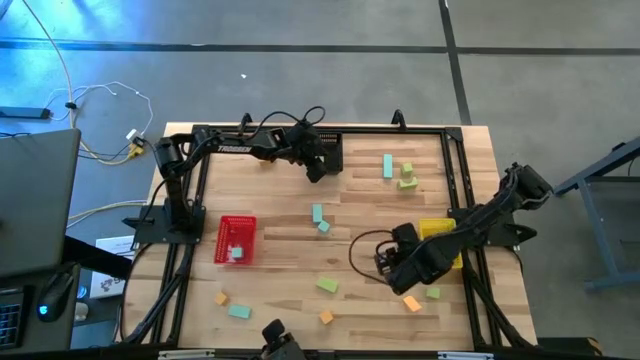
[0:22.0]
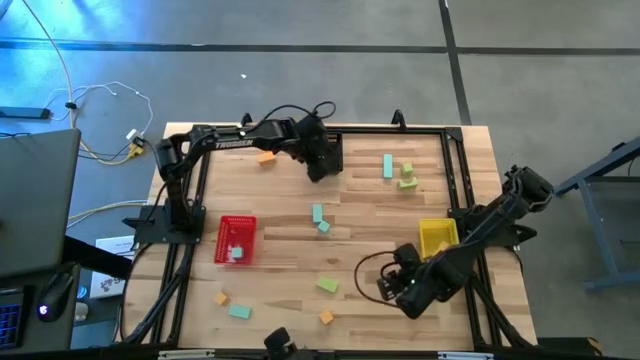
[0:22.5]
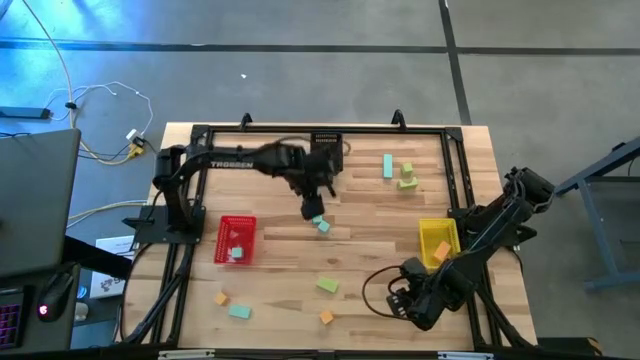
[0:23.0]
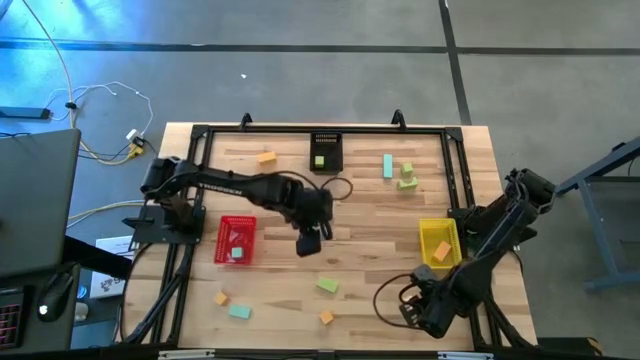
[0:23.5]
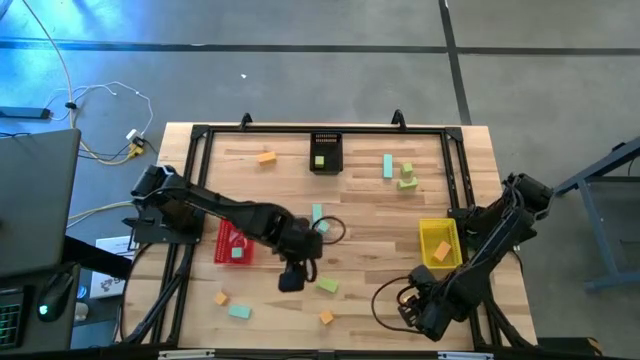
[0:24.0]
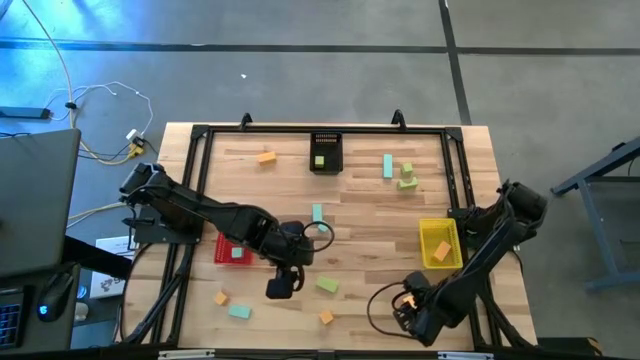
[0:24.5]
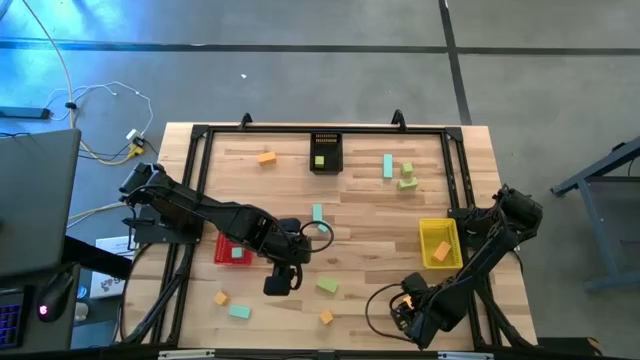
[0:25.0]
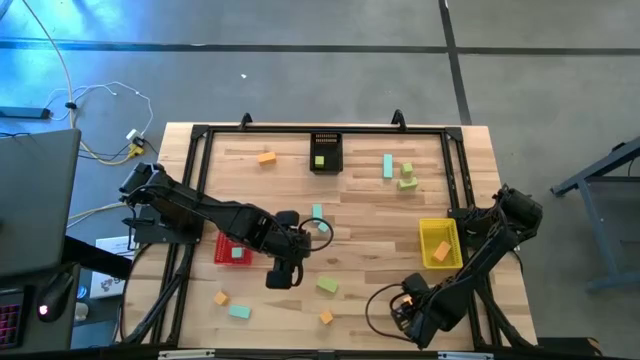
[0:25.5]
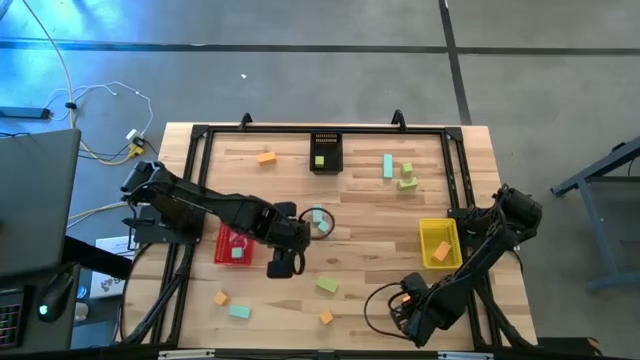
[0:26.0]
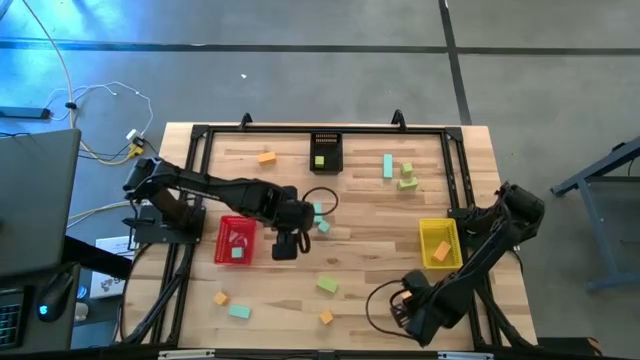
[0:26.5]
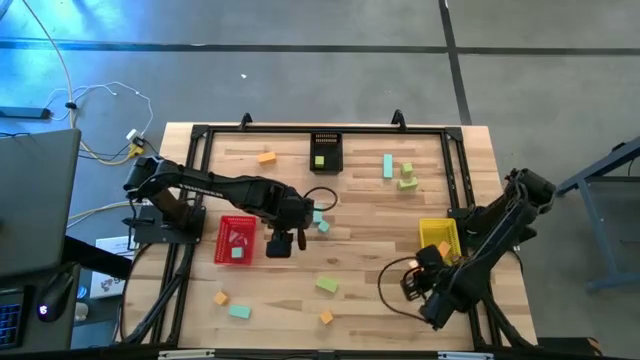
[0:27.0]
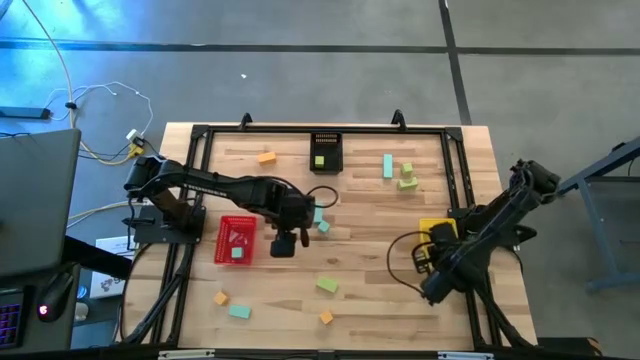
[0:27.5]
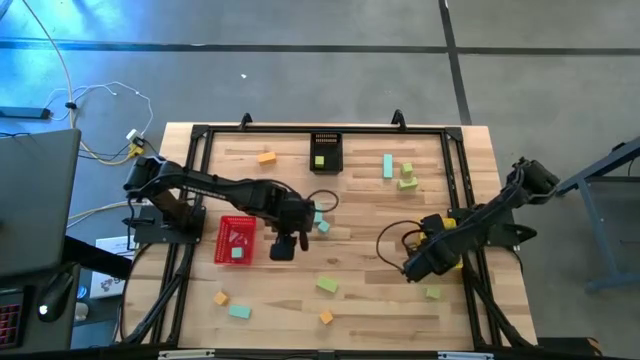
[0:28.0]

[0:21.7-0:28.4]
Task: Sort & place blocks by color
Put the yellow block into the yellow bin

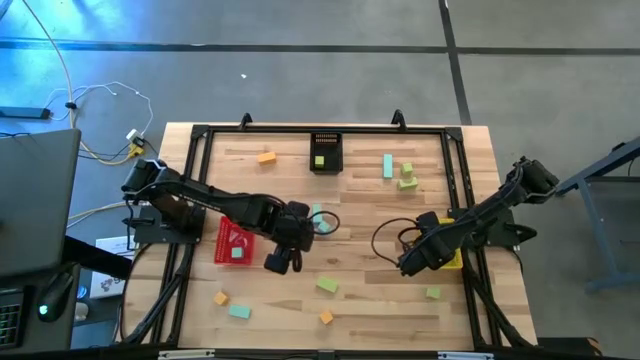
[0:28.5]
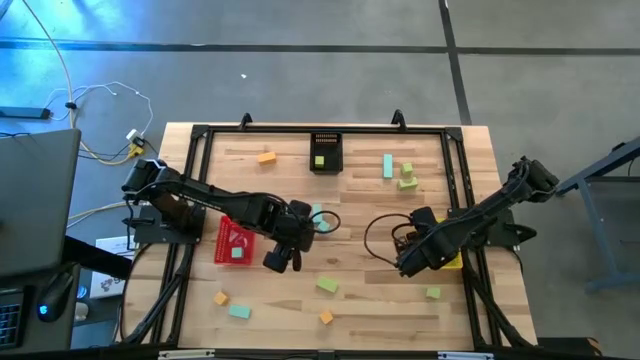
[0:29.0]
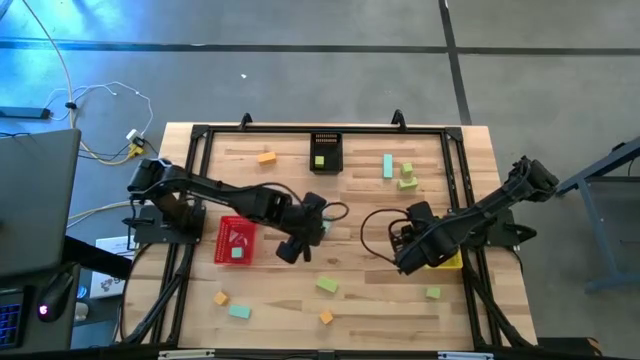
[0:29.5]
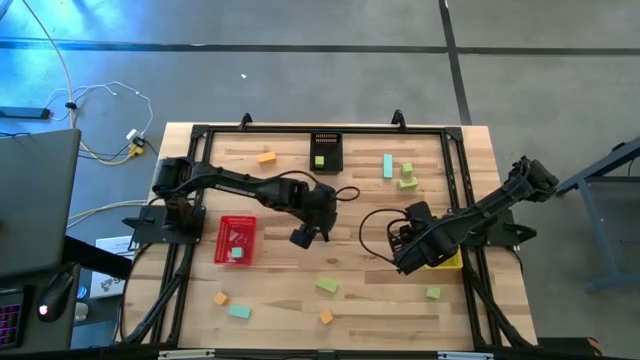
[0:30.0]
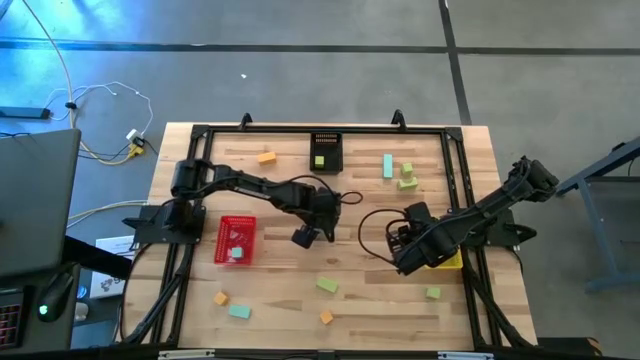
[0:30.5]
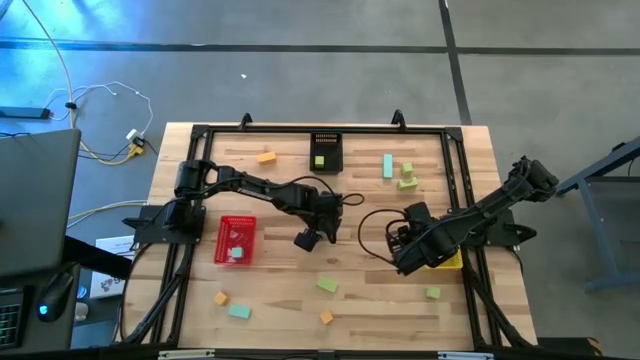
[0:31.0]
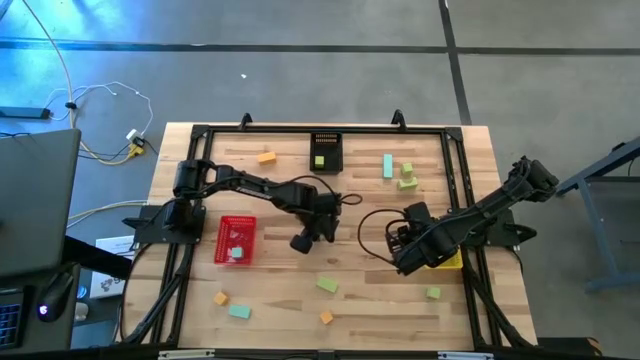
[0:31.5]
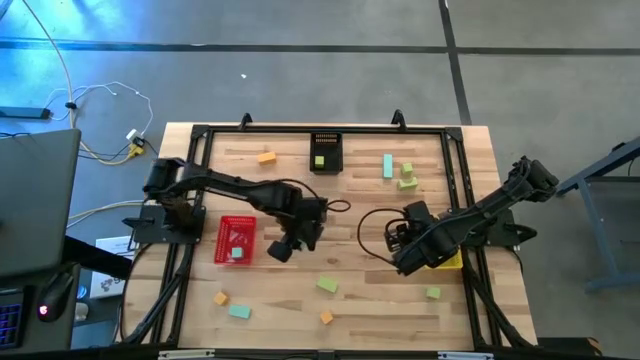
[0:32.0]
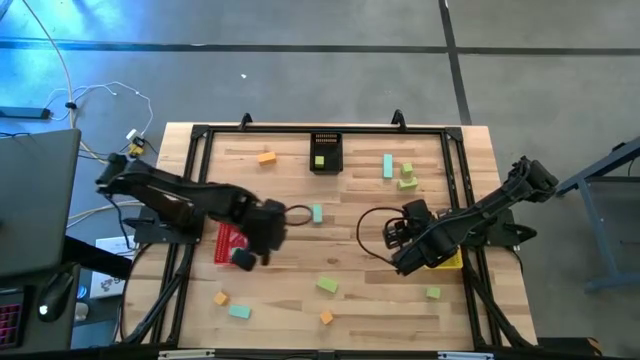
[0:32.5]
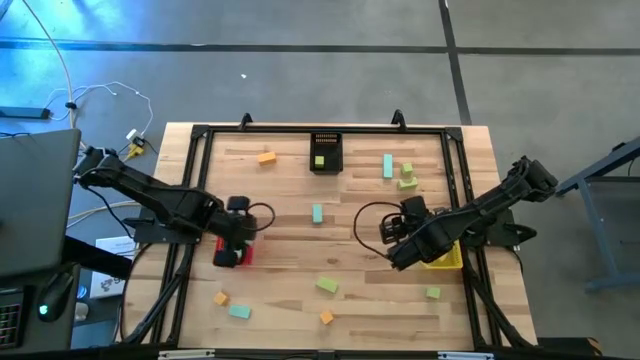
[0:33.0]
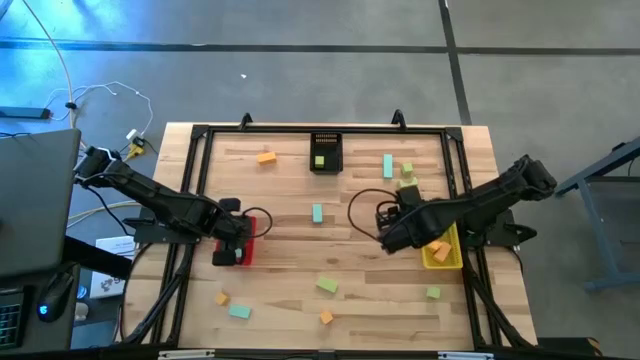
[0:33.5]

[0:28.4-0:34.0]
Put the blue block into the red bin

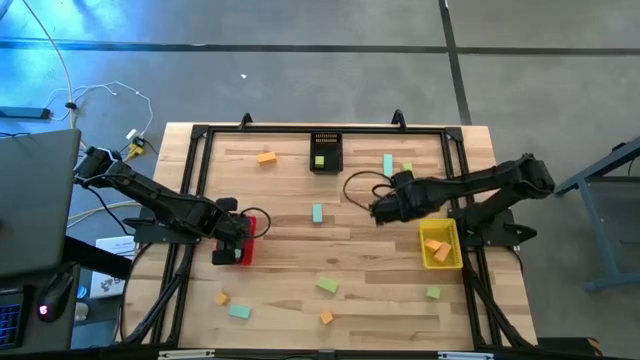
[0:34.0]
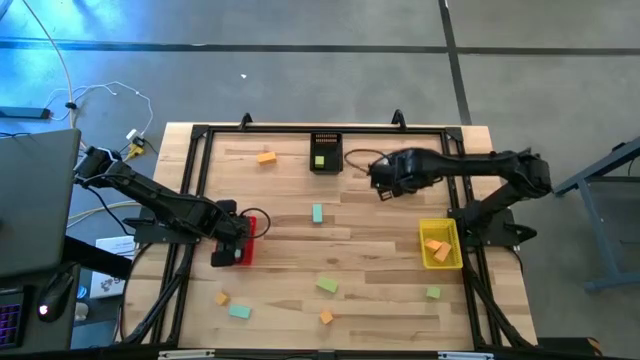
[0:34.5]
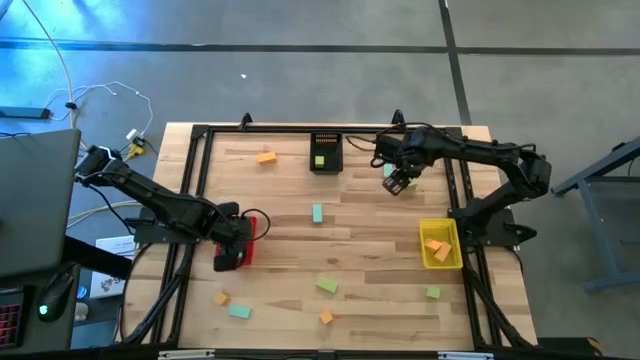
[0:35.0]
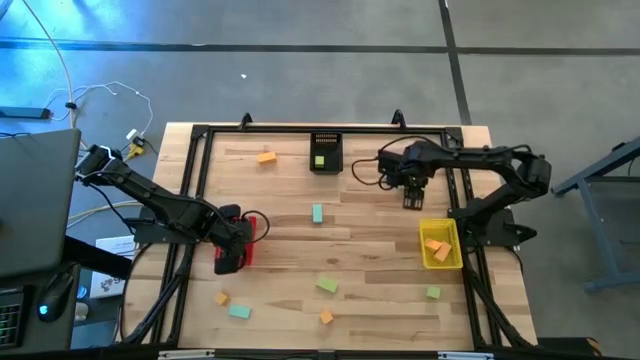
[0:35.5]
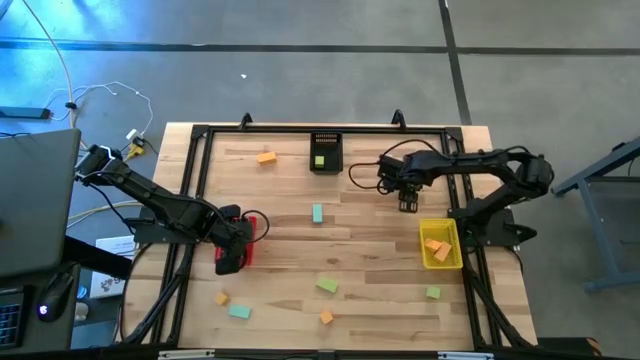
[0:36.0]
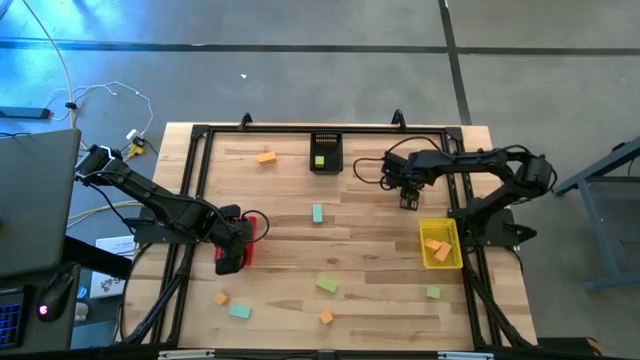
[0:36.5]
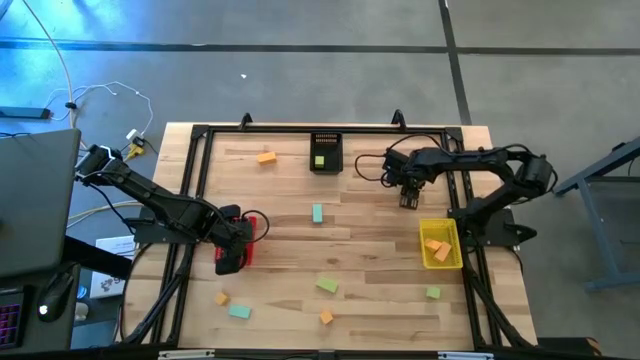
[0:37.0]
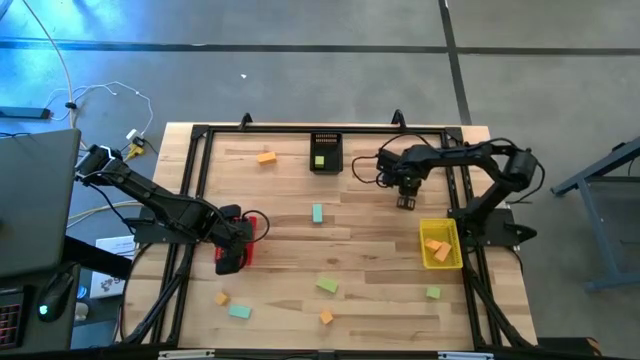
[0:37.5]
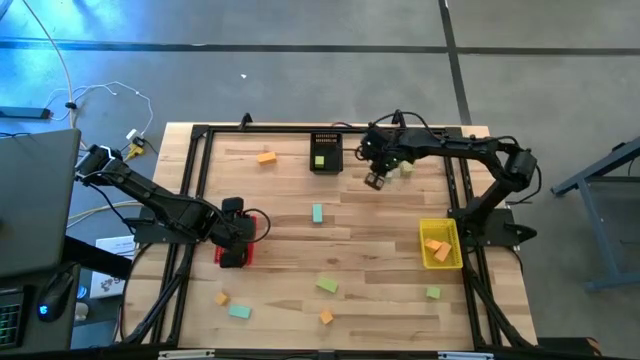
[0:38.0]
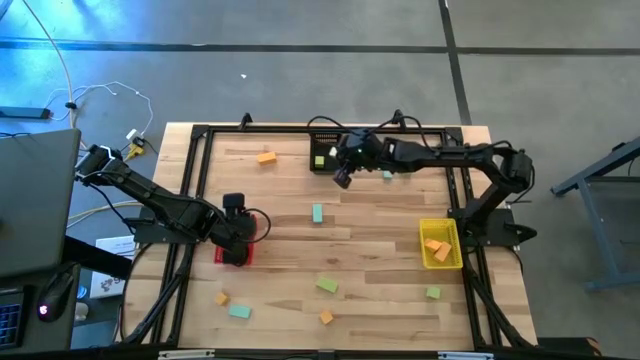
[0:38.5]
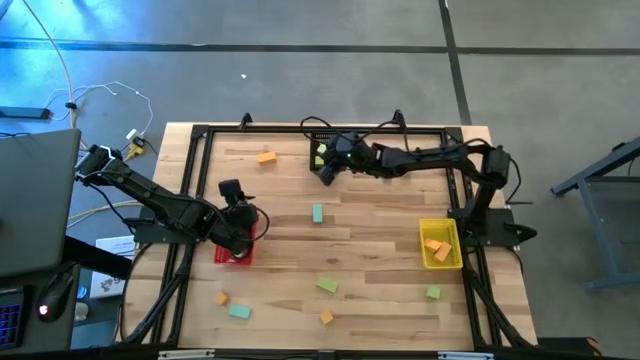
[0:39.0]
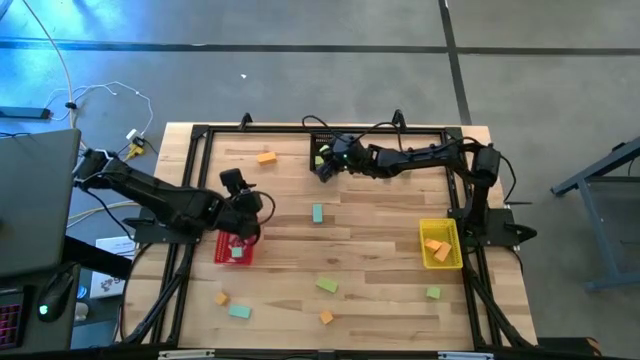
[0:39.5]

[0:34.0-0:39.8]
Put the green block into the black bin

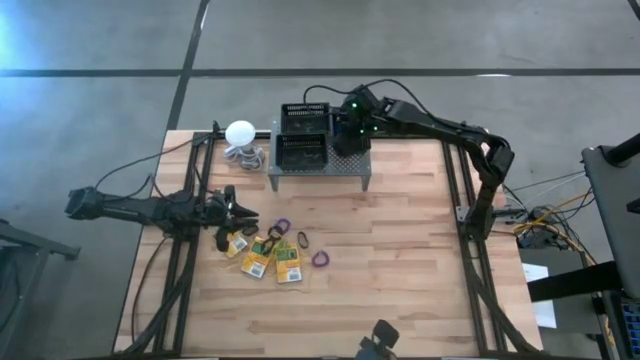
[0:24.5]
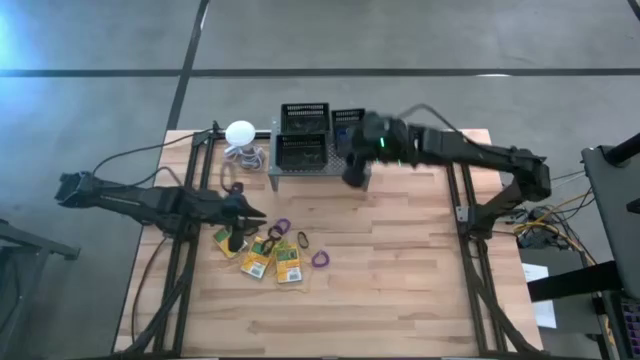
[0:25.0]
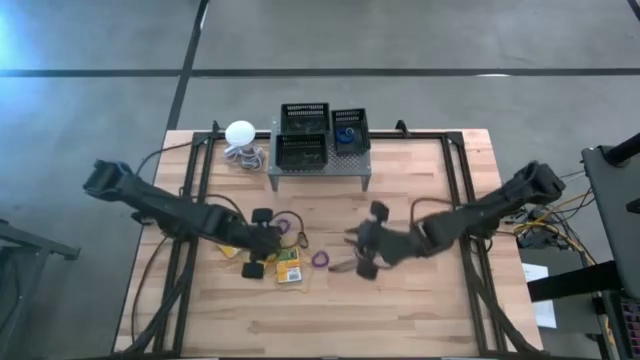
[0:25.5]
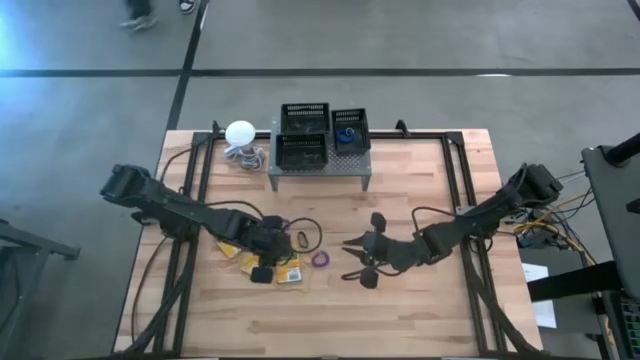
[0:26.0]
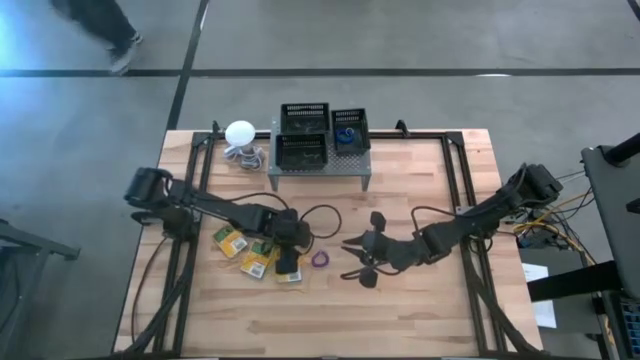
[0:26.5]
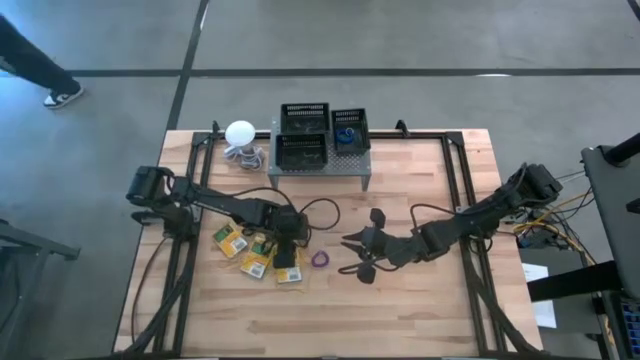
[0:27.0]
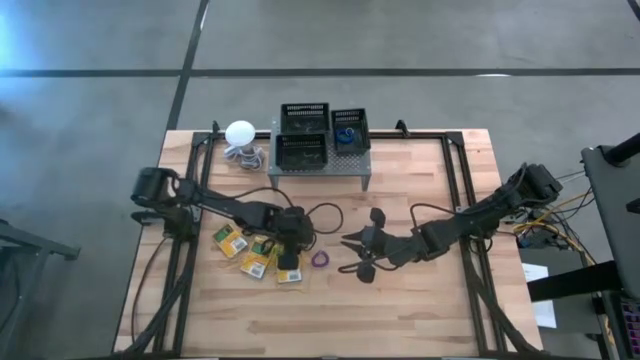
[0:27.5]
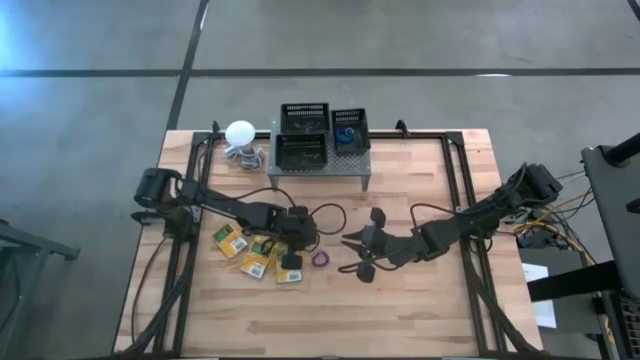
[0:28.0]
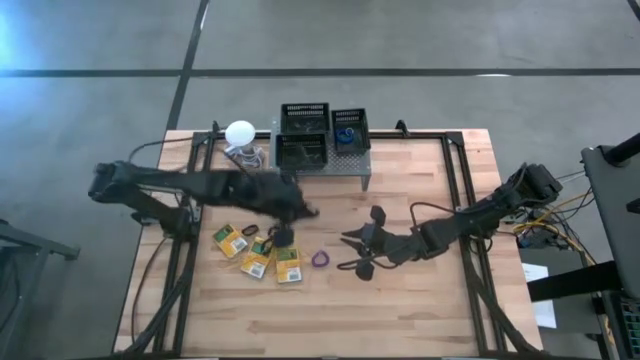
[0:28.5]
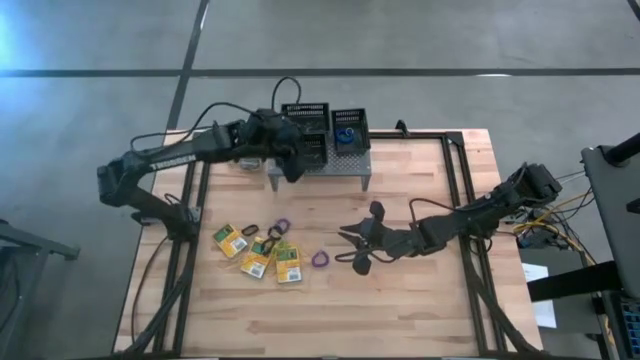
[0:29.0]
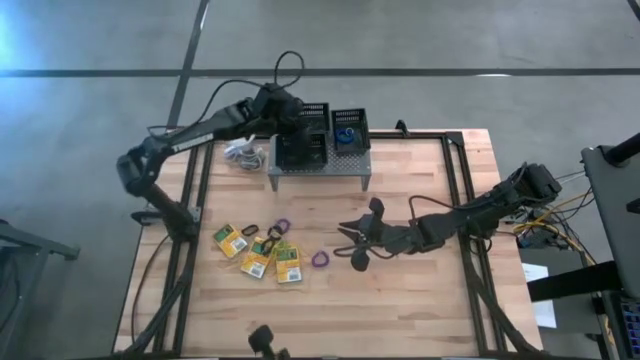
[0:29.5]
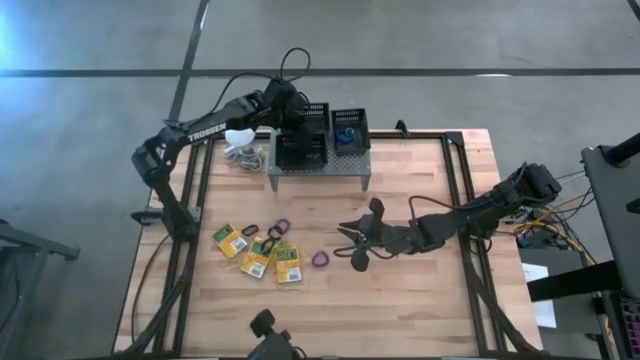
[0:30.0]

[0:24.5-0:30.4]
Task: Pick & Place Office Desk Supplies
Put the black rubber band into the top left black bin on the shelf
